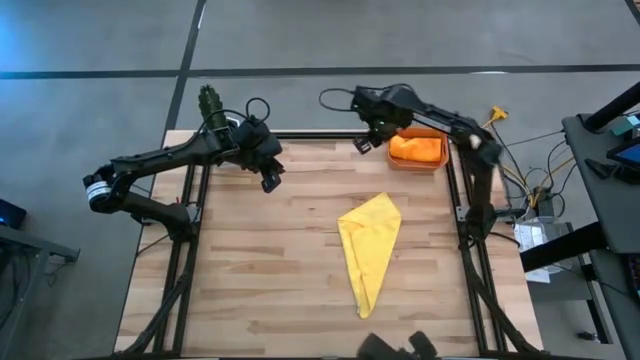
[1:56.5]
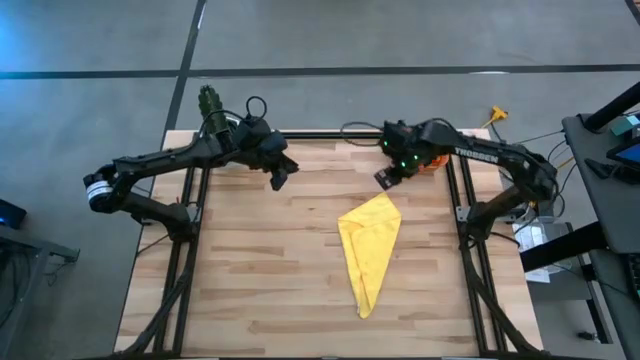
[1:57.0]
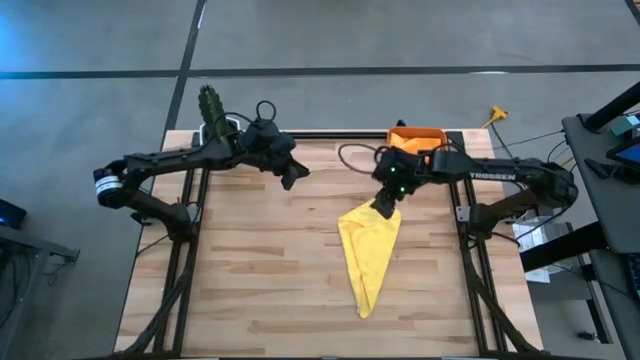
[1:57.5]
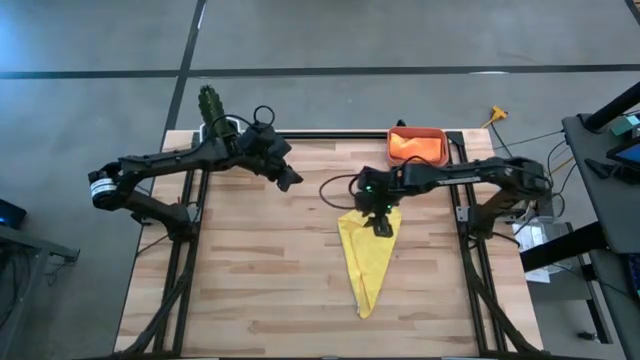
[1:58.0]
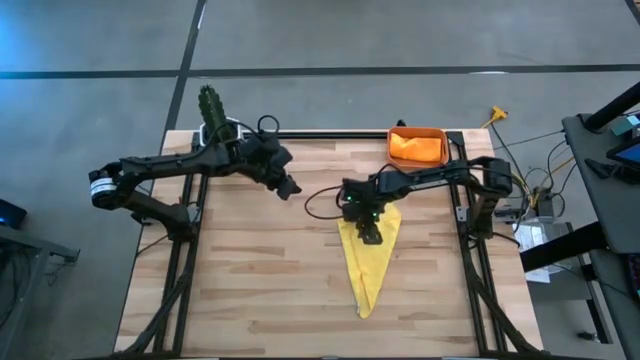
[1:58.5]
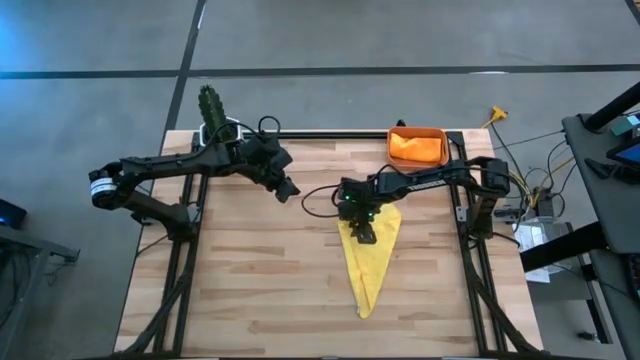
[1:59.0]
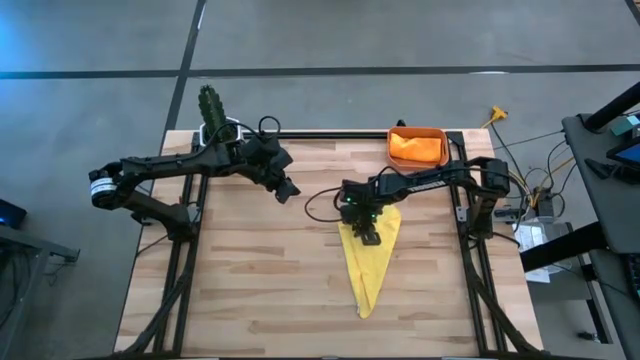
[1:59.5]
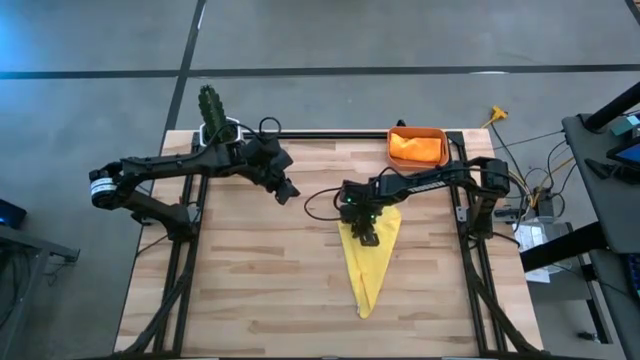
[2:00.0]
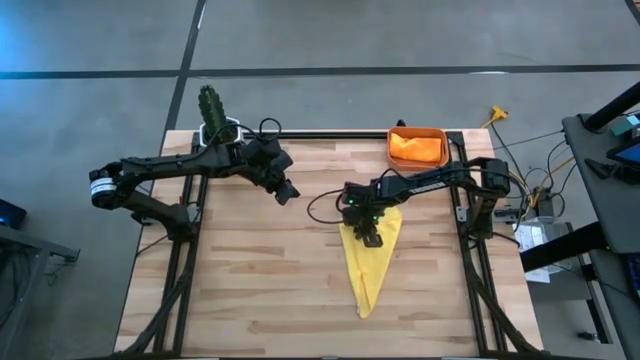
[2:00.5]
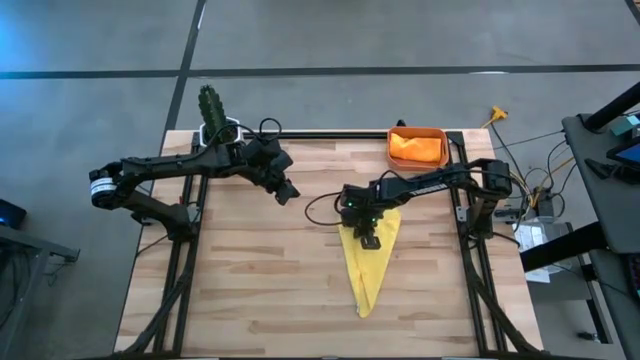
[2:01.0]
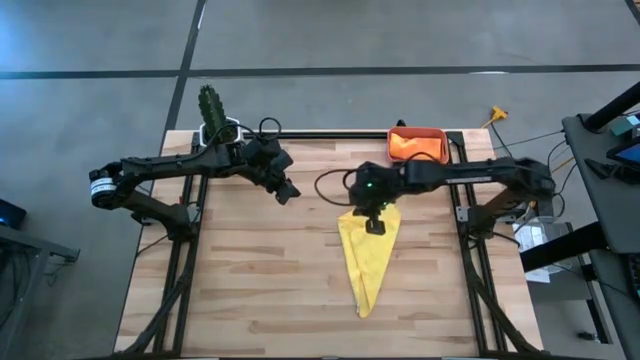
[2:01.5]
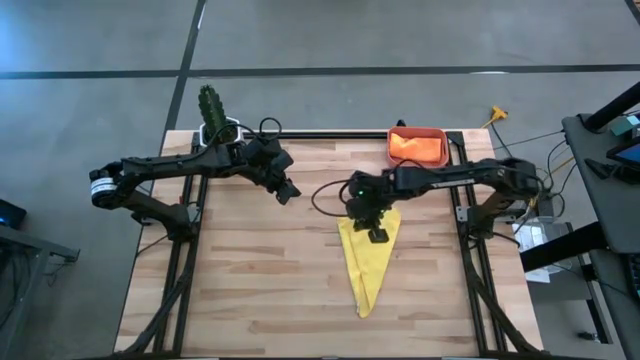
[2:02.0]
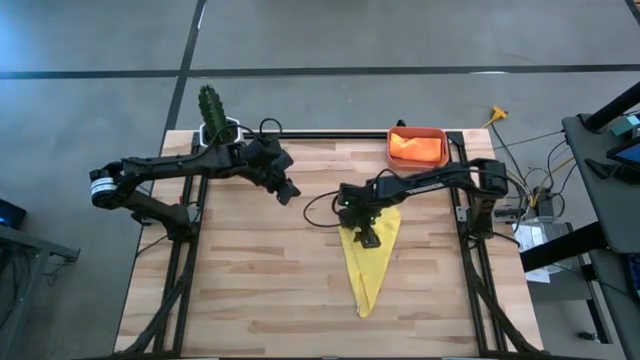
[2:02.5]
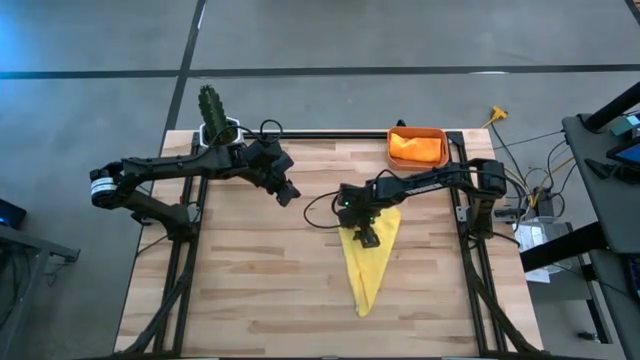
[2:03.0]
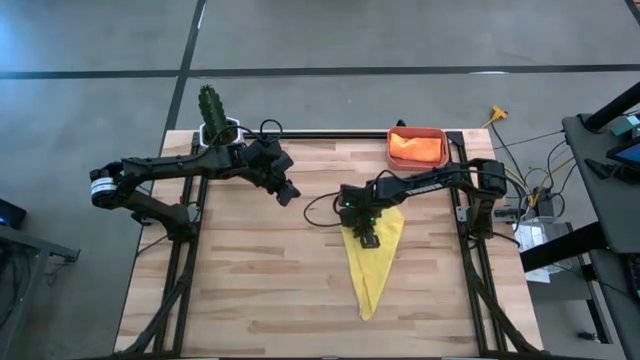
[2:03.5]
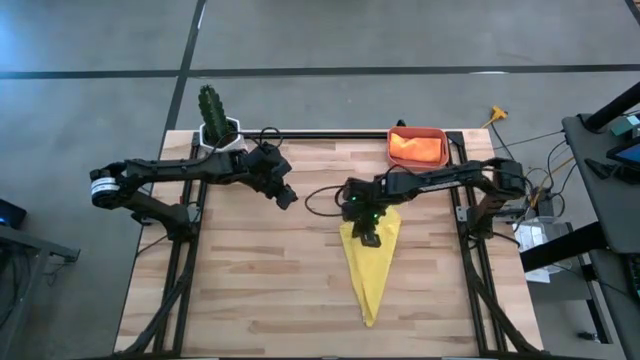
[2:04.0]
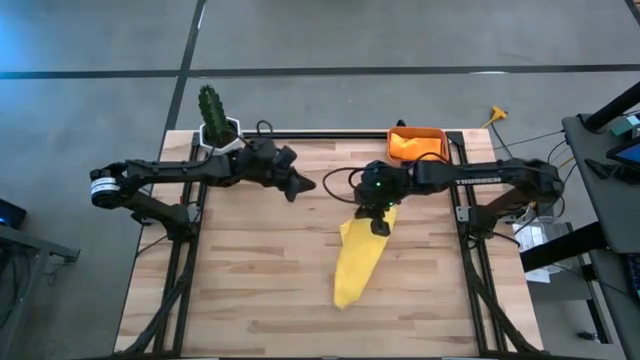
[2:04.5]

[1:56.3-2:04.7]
Task: Roll microfiber towels into tight, uniform cylinder then place into a basket
Fold the yellow towel
